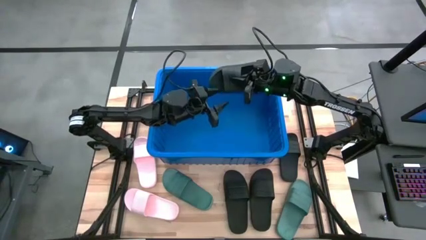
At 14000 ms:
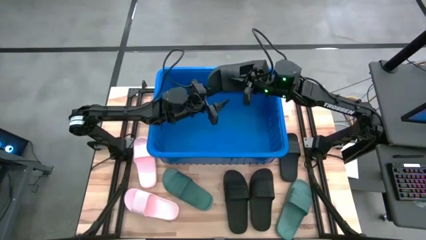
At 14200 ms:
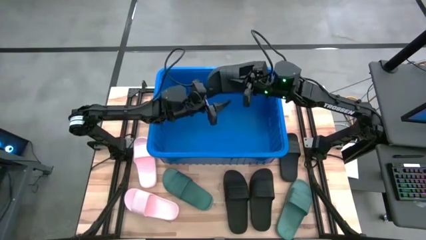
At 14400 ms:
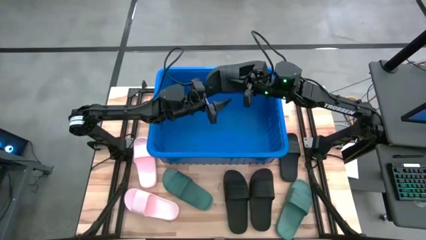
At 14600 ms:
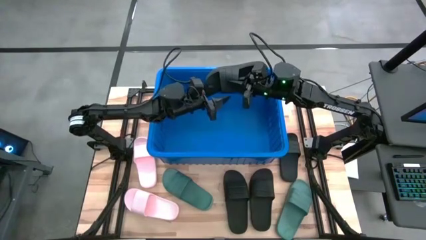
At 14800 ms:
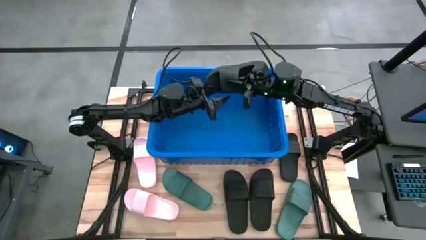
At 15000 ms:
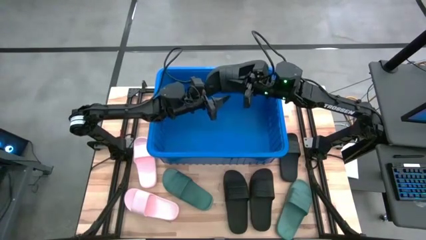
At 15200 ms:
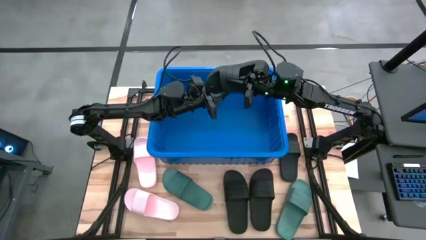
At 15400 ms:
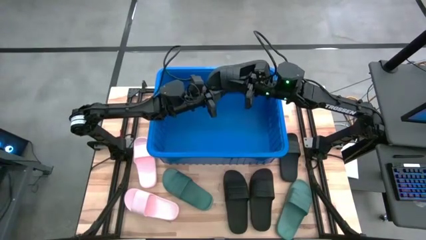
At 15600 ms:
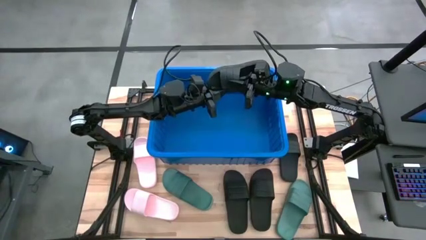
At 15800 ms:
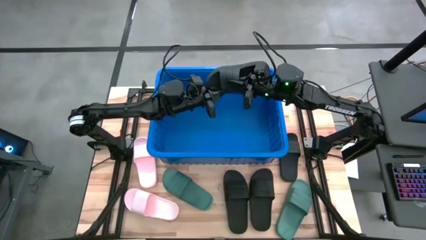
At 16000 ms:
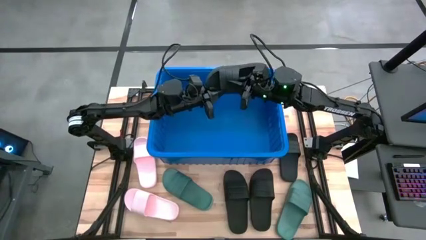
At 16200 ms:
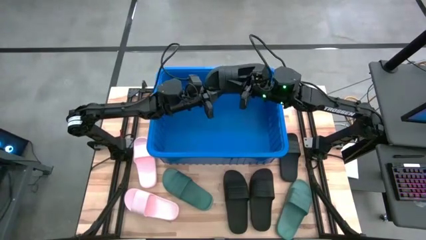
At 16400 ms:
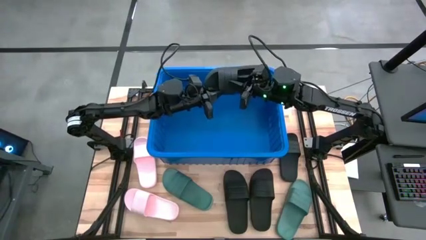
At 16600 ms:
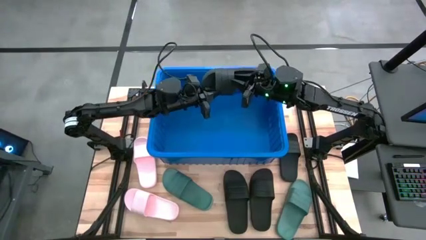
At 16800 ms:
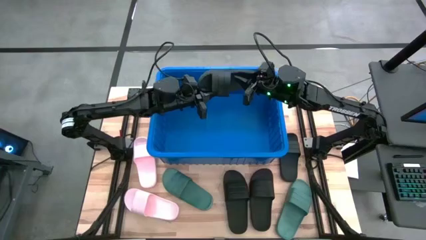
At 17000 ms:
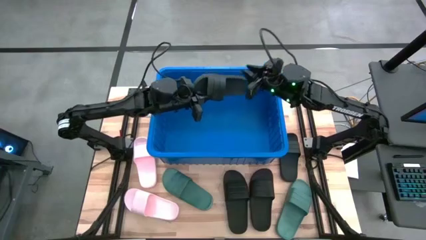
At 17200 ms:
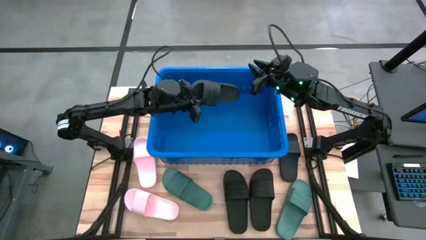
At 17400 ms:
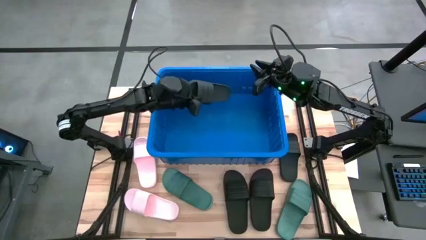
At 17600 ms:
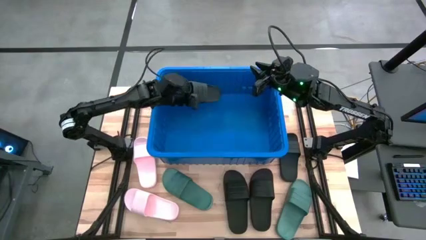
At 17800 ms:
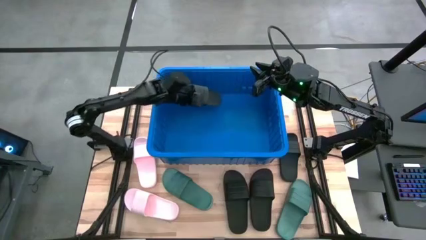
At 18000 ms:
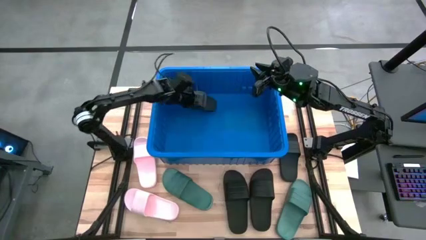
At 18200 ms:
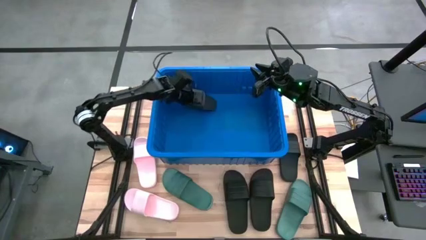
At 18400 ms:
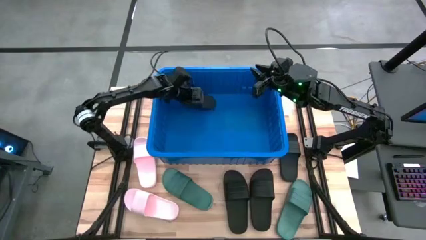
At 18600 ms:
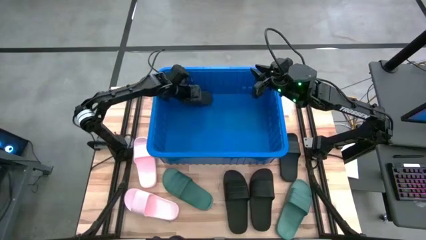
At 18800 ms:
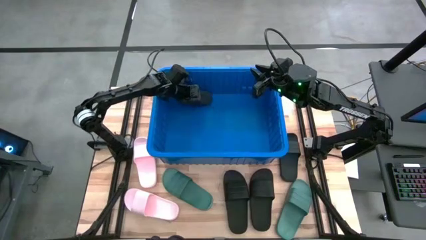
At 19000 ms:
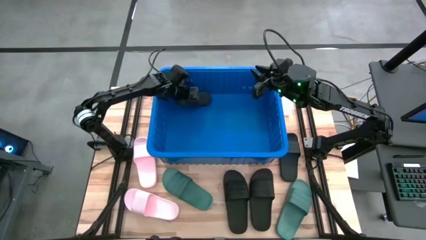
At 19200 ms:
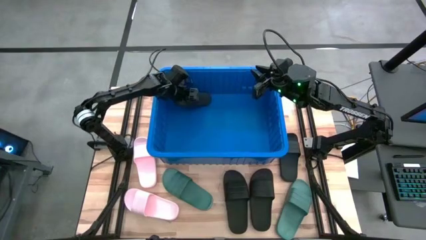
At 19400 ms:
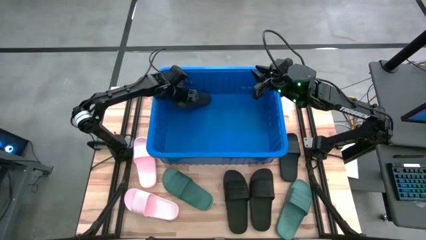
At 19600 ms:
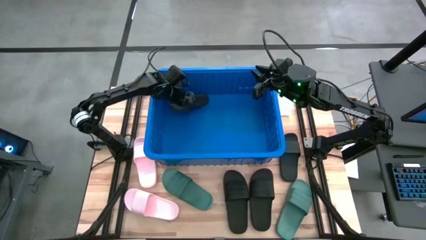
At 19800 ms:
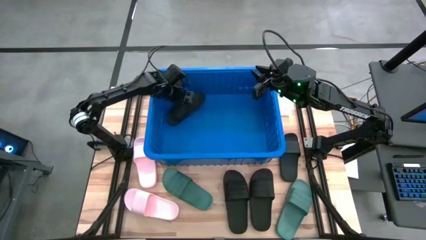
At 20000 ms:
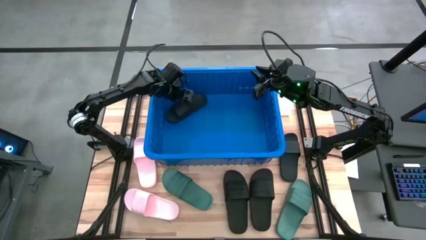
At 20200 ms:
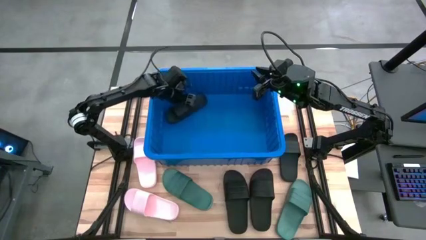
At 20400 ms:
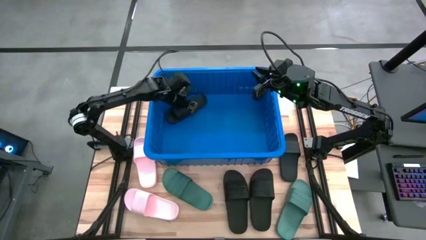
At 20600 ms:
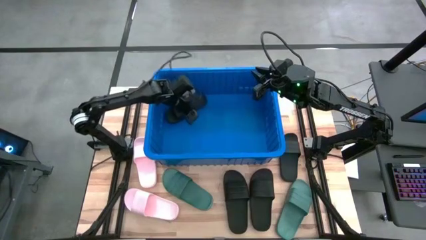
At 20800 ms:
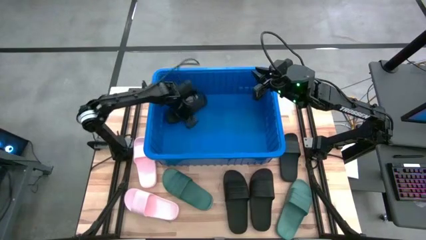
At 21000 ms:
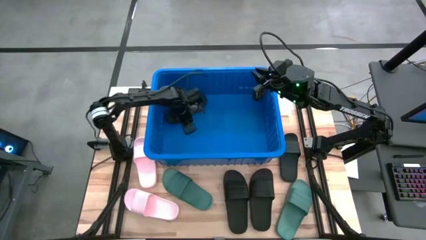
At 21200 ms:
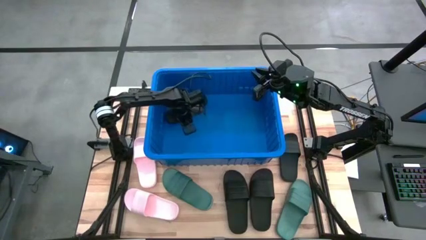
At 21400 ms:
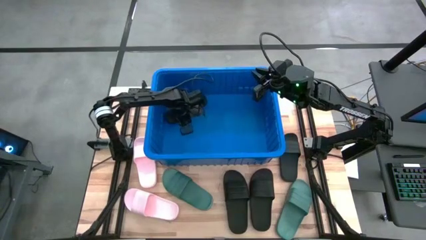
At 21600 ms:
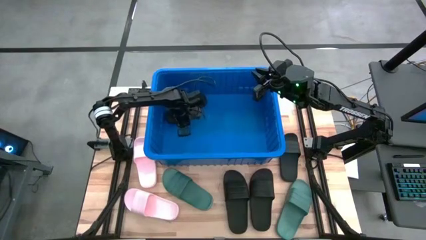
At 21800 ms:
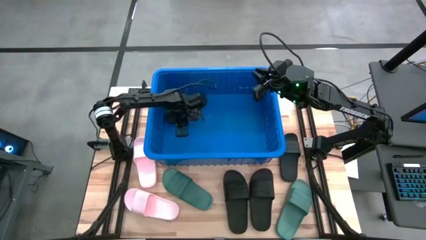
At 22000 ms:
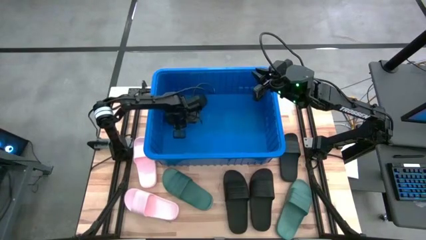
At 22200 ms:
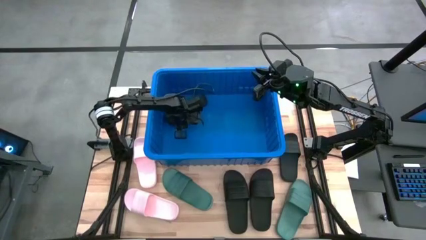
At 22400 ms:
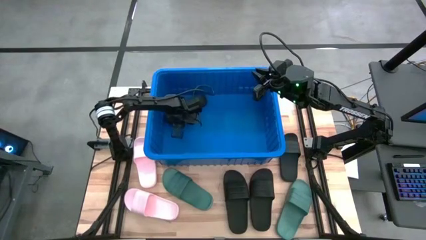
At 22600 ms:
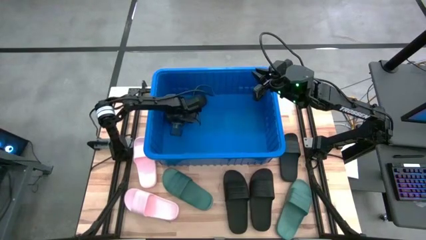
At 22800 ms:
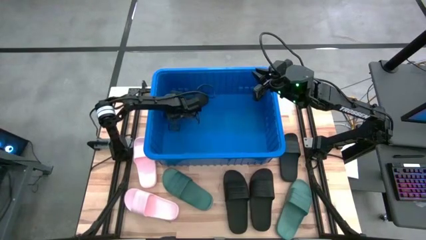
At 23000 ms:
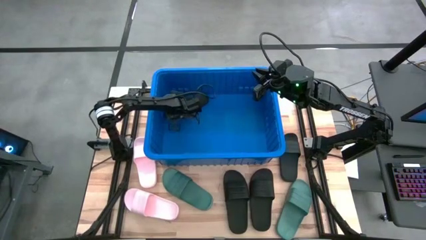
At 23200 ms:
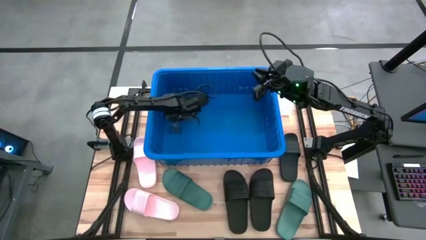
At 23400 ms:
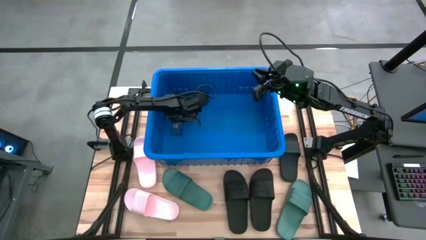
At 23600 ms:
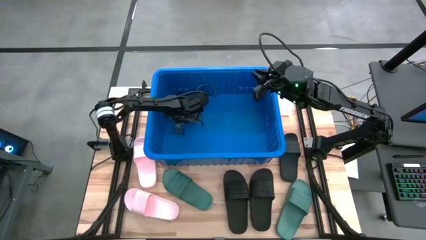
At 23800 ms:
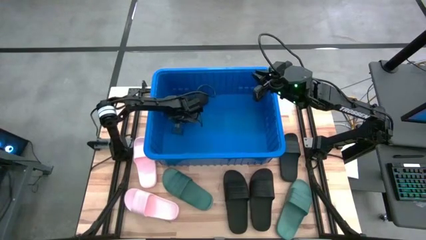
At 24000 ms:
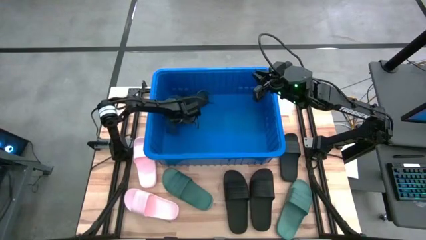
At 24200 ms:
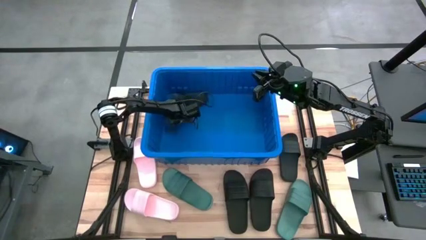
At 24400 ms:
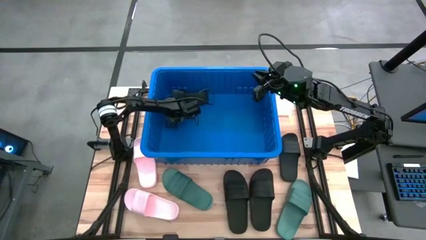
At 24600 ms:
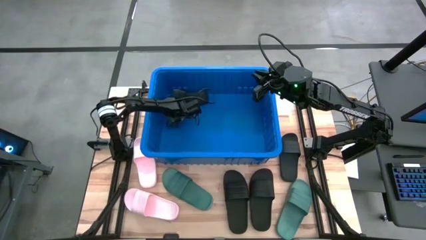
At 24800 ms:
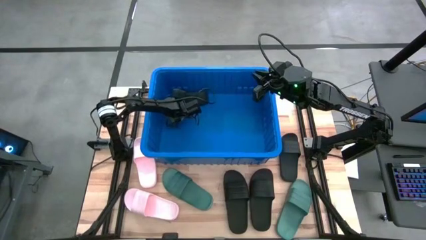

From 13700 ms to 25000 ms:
Task: Pick and place slides into bin
Put the black slide into the blue container
